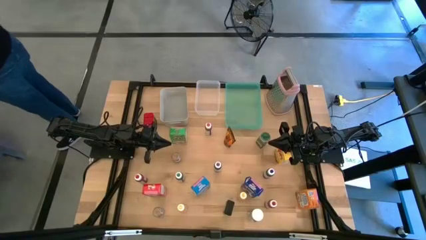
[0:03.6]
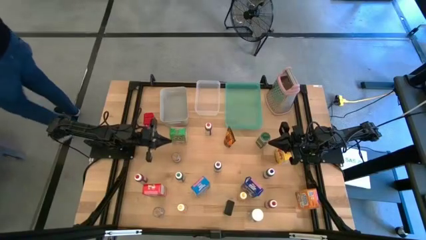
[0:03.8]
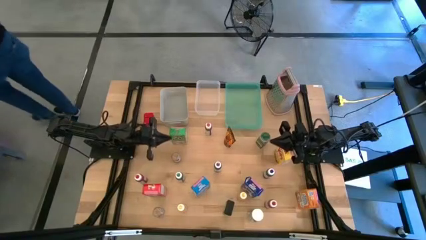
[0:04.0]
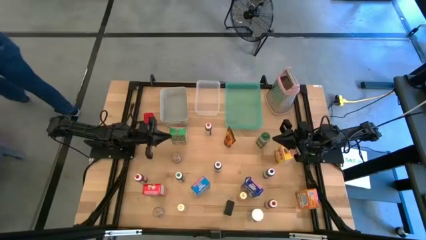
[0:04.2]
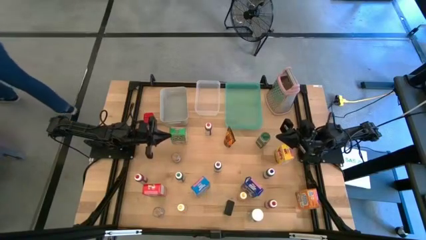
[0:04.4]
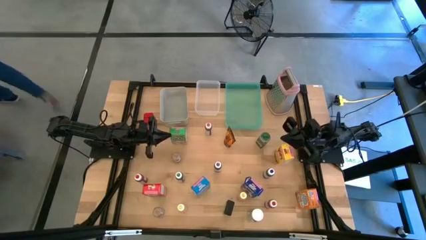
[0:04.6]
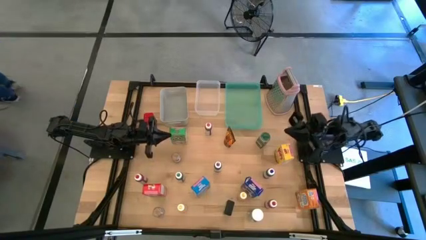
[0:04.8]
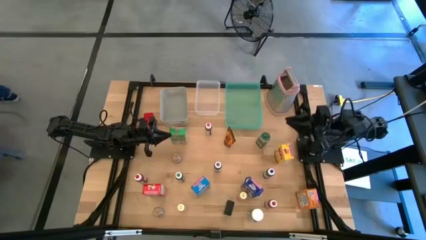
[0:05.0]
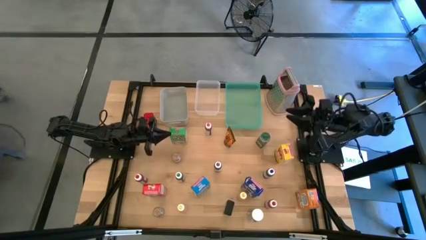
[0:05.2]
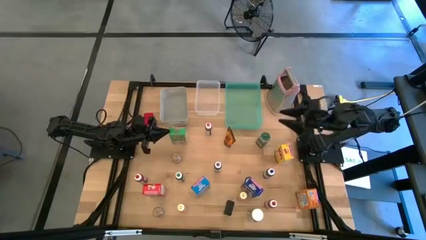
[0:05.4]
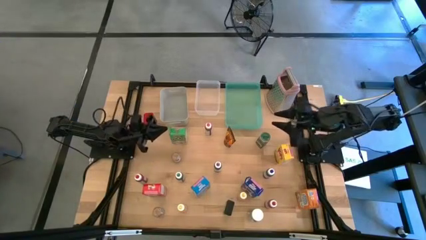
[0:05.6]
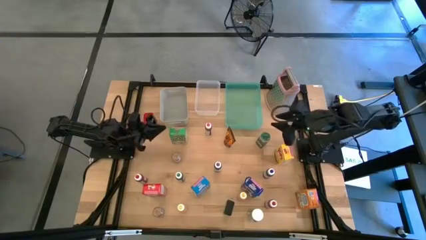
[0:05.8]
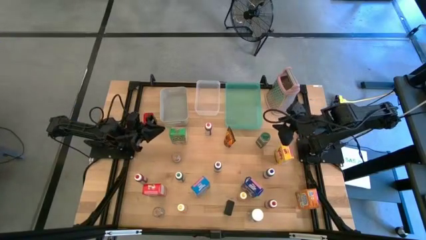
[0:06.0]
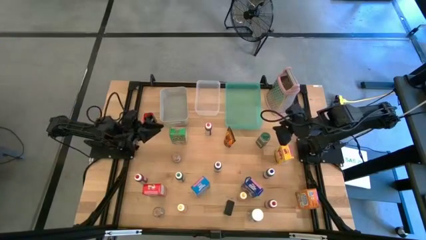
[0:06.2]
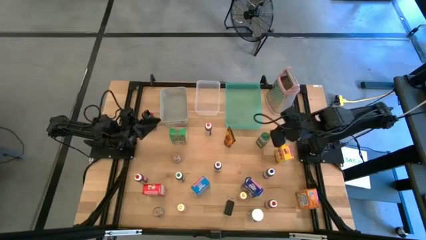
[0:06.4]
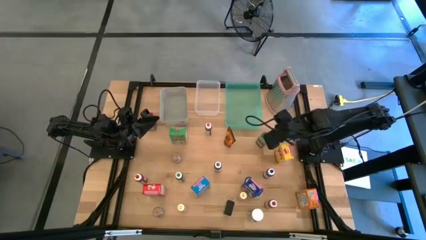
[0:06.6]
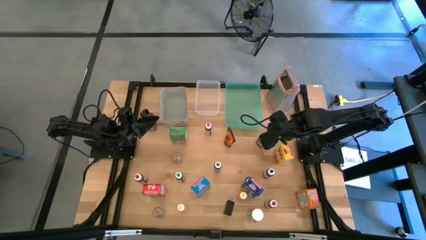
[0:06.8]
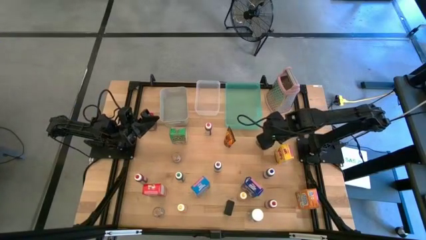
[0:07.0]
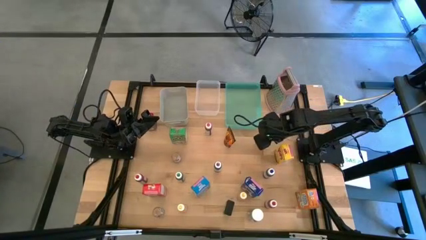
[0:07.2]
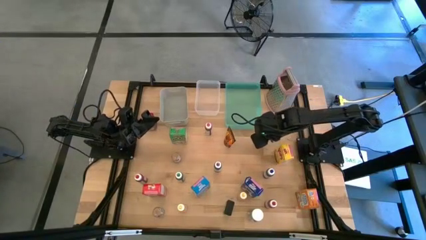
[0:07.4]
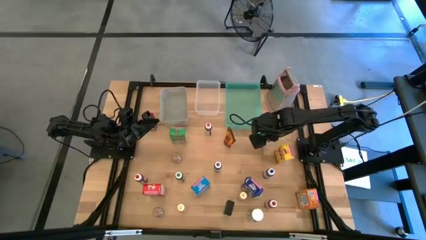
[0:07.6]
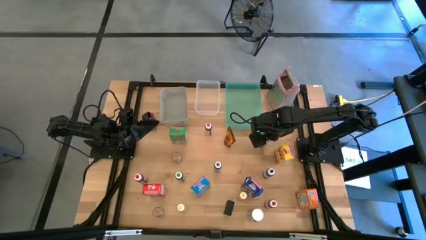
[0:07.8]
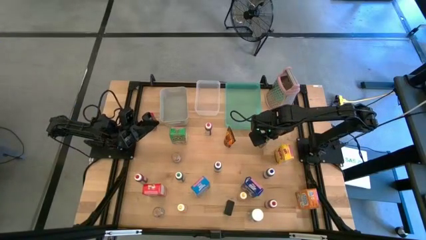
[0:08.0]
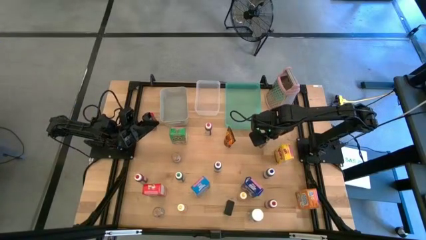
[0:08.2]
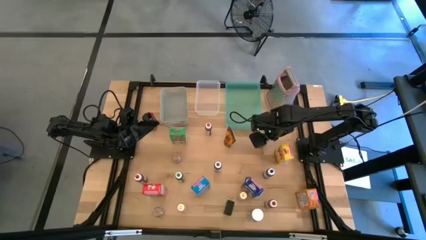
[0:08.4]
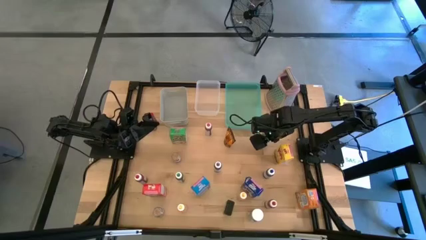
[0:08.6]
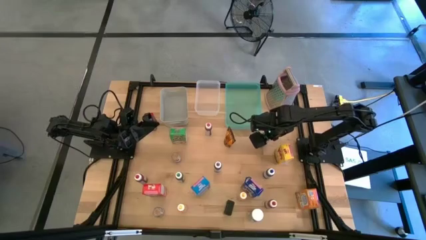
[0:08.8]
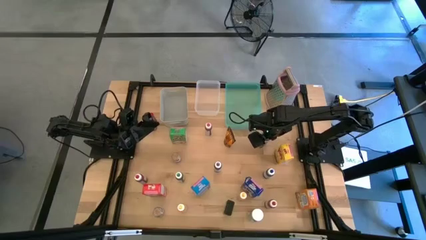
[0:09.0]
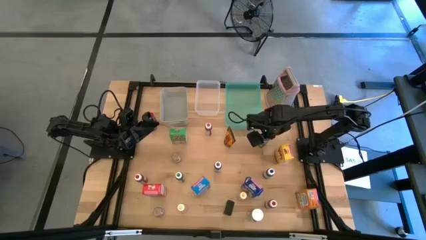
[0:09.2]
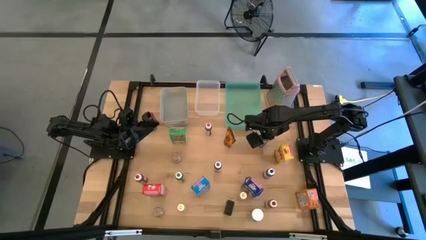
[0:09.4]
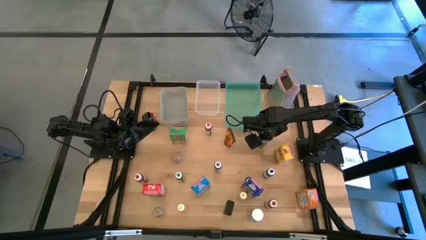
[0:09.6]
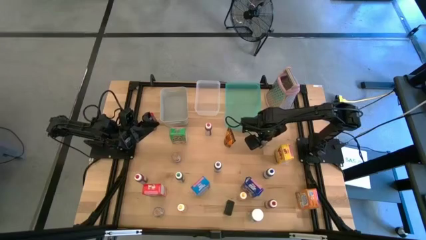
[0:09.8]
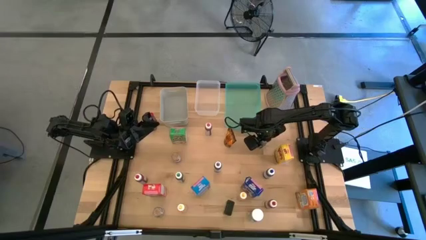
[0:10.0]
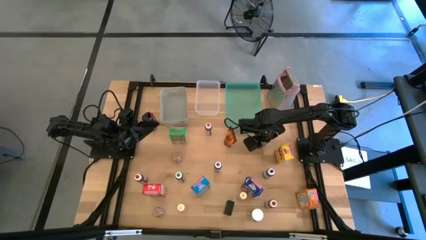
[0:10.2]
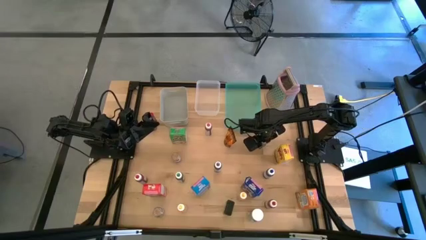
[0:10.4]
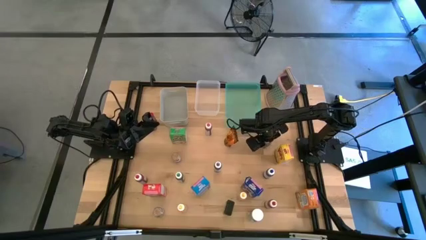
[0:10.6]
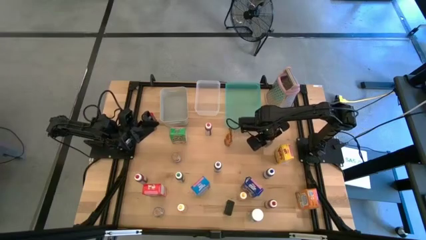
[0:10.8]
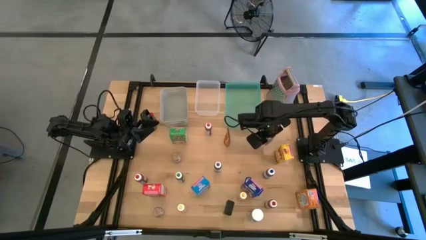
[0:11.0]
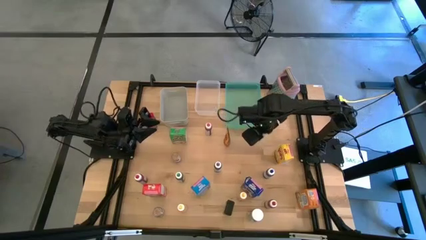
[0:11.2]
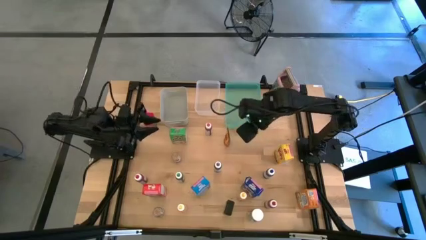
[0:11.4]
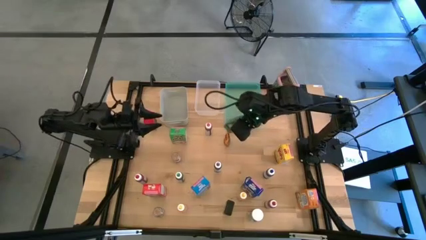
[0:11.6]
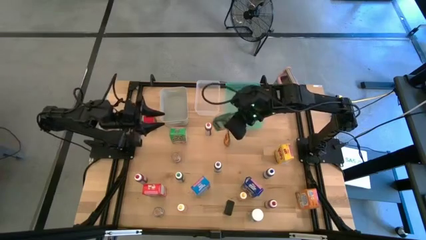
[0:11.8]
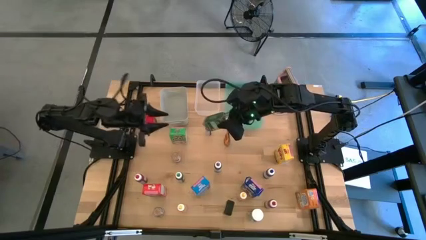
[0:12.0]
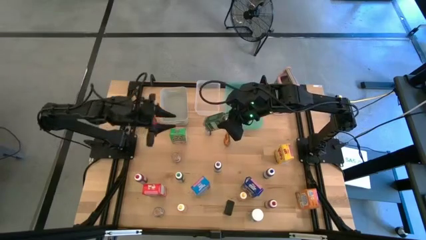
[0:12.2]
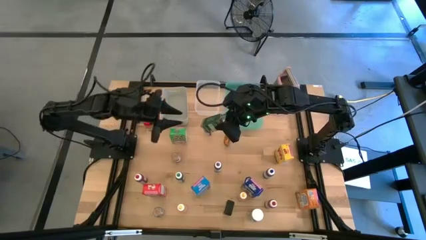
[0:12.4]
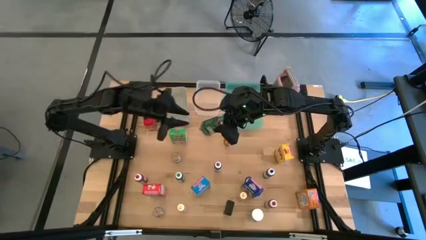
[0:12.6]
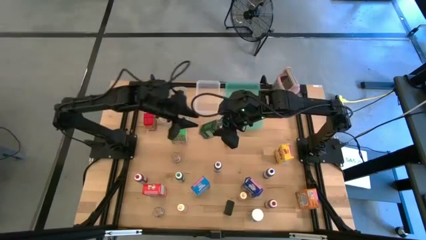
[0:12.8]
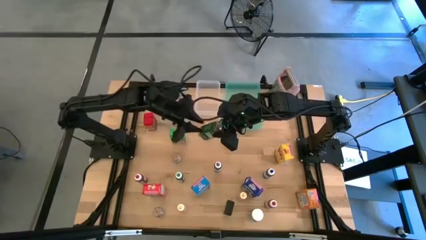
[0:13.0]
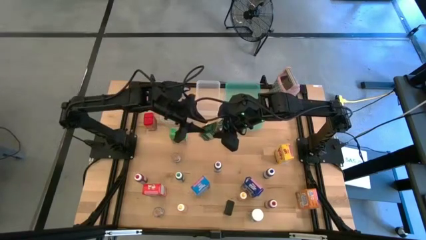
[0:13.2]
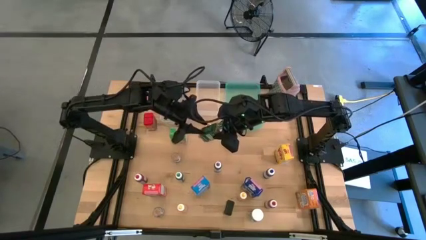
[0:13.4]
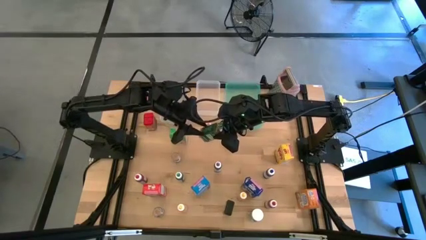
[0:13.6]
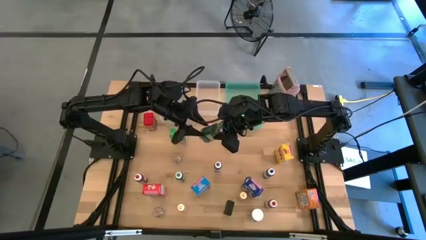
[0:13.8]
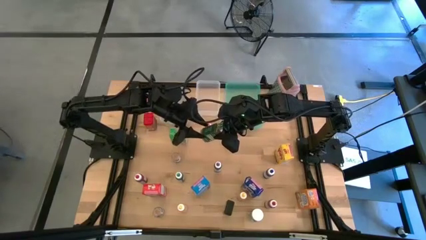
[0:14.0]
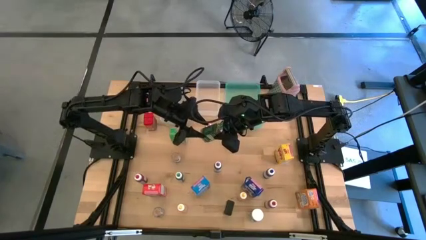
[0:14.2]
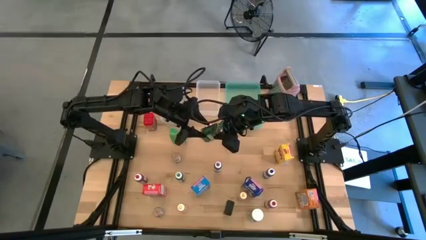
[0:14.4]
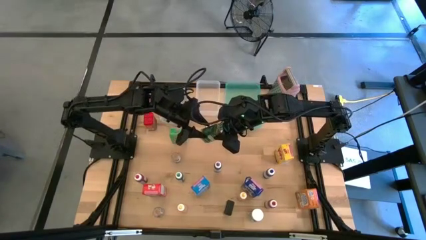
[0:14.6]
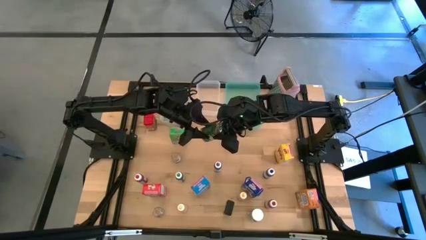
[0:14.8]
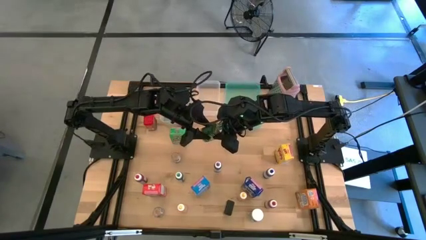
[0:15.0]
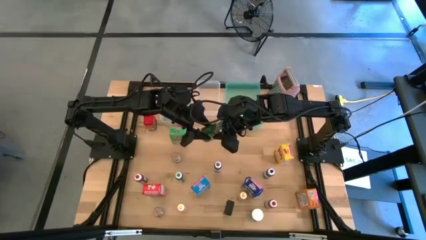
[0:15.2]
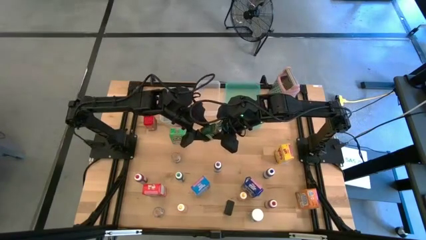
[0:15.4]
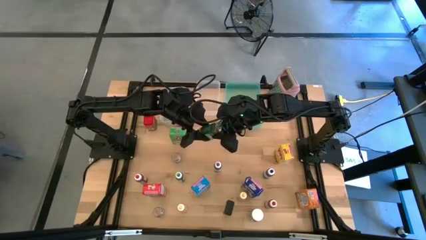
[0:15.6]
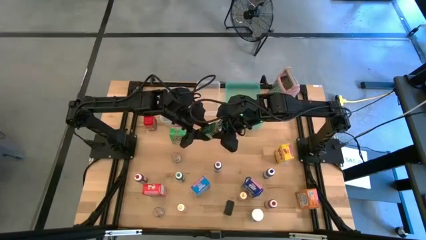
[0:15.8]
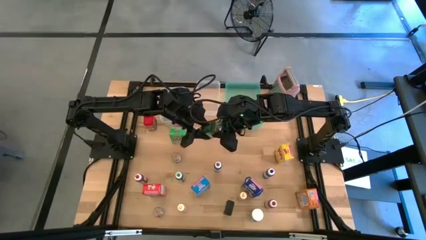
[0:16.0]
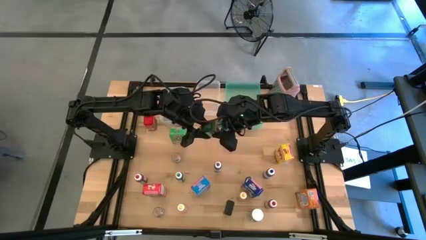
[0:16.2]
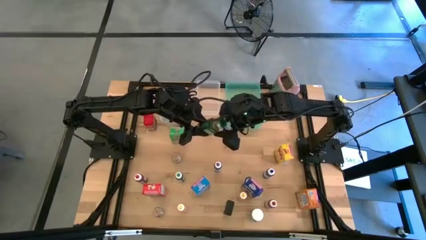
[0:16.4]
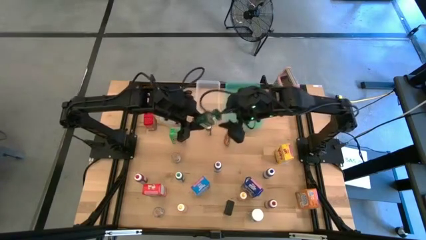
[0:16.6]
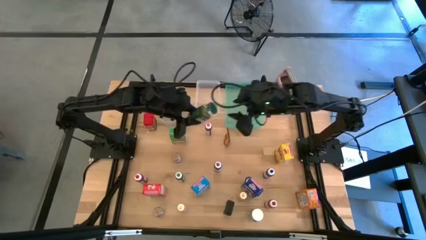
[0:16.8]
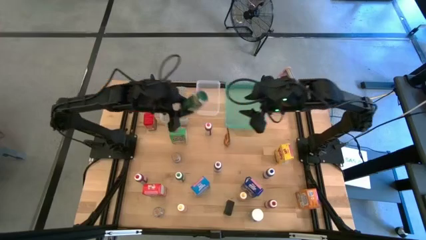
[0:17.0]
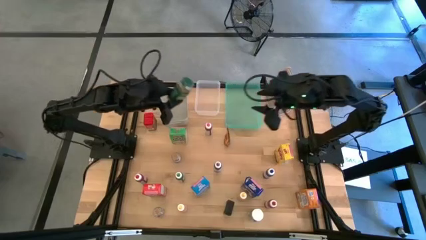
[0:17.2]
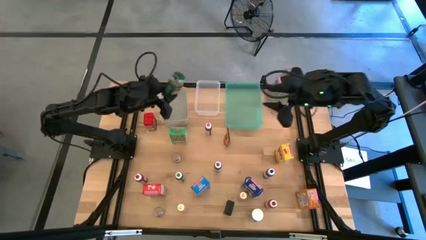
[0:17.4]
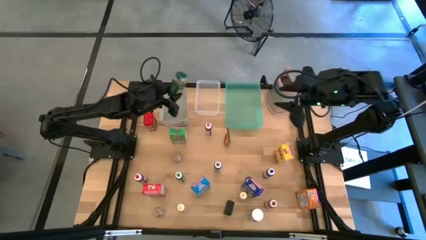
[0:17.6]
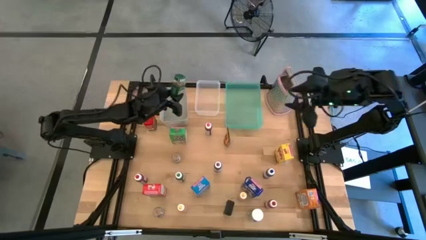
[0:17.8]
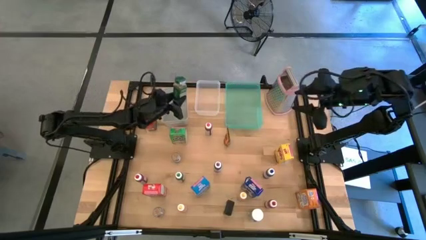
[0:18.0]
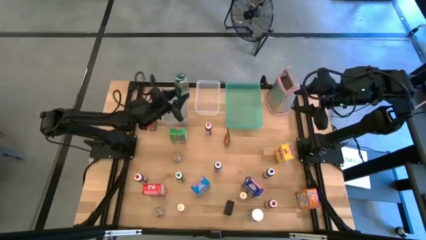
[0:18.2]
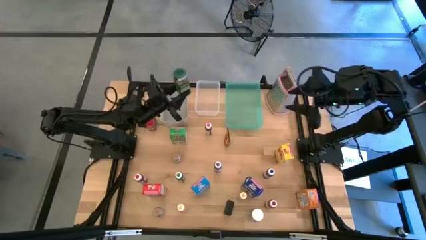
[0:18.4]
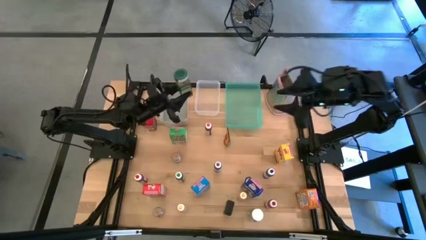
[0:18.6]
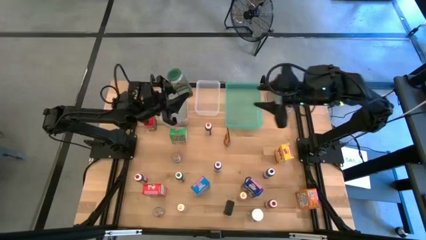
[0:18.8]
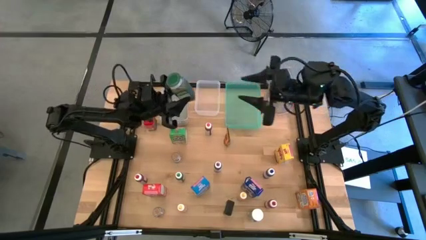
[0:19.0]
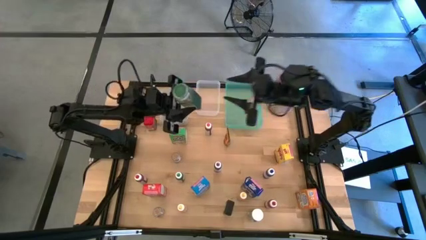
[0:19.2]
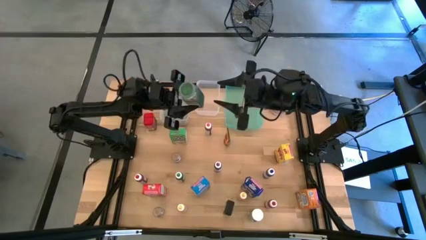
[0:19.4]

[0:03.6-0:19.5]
Task: Pick & Place Kitchen Items
Put the green seasoning bottle into the gray bin
